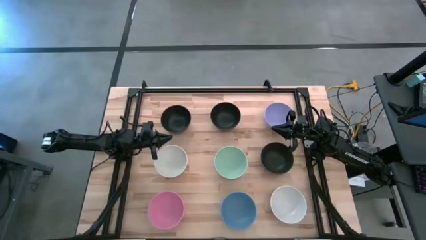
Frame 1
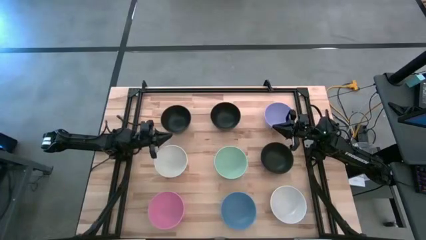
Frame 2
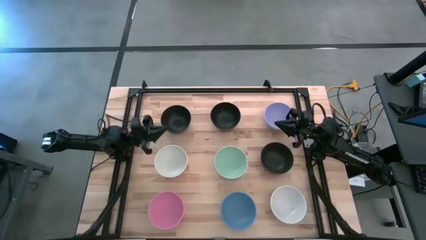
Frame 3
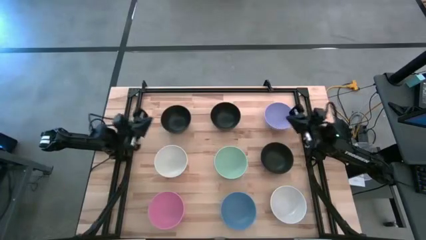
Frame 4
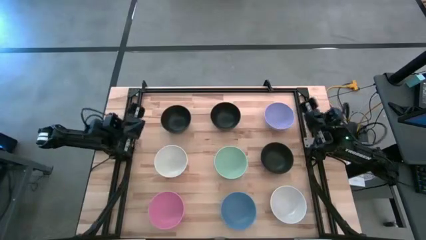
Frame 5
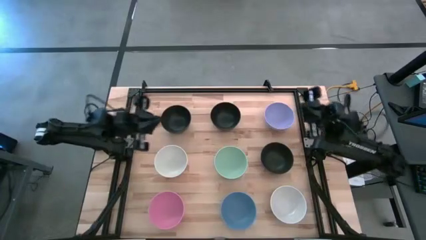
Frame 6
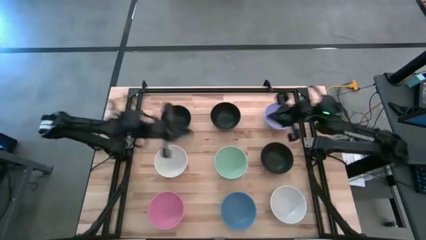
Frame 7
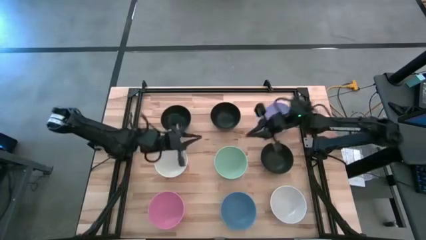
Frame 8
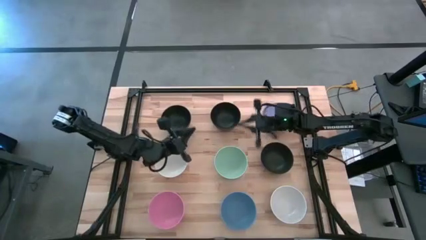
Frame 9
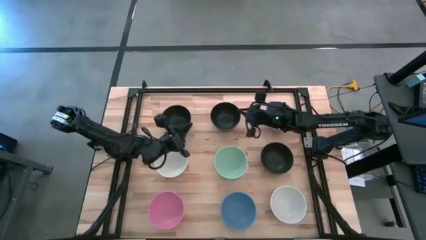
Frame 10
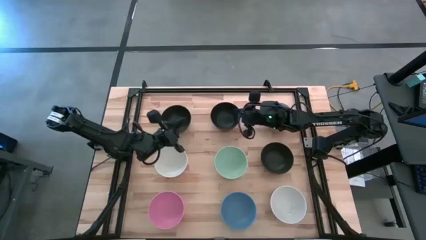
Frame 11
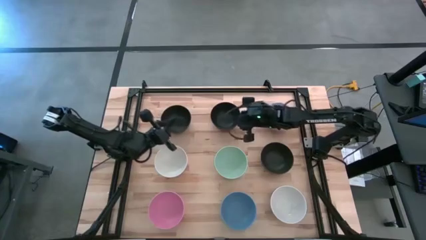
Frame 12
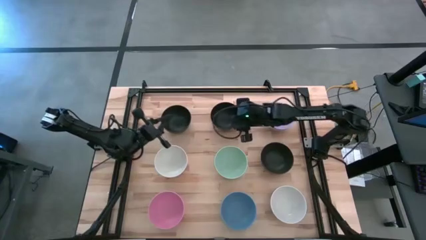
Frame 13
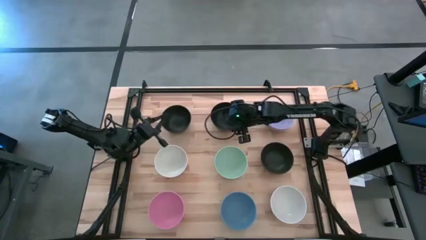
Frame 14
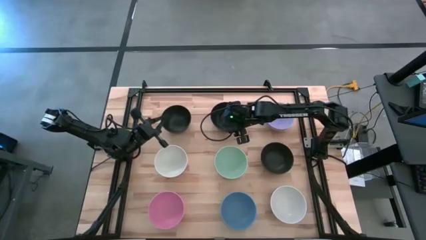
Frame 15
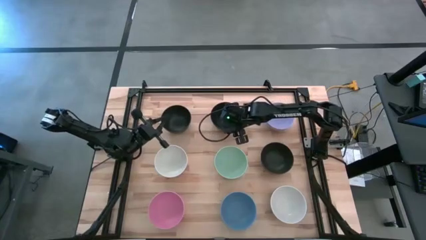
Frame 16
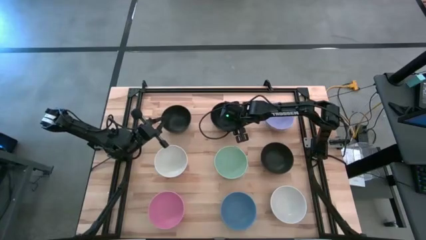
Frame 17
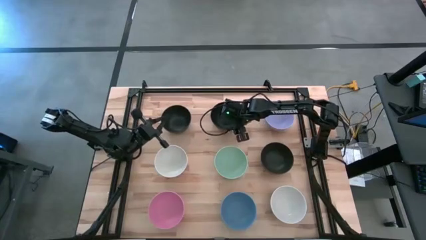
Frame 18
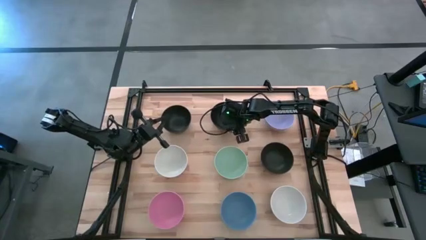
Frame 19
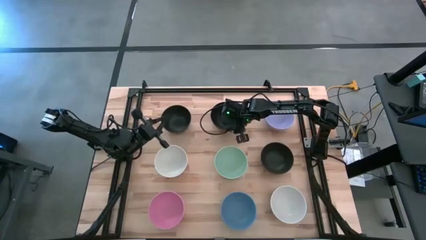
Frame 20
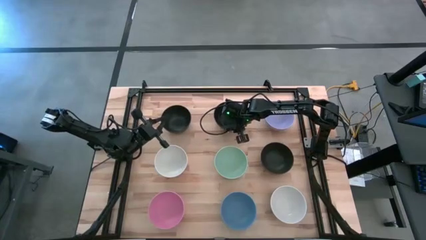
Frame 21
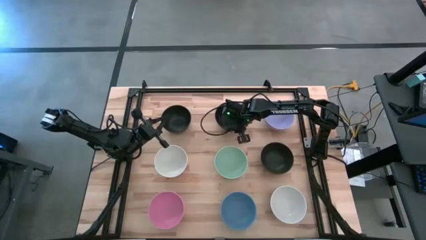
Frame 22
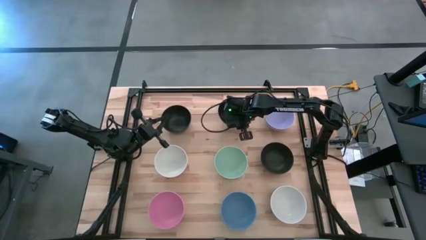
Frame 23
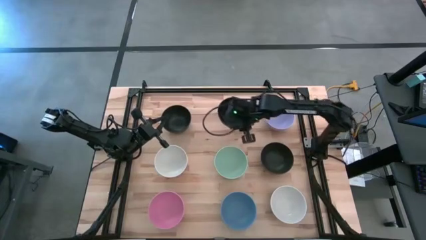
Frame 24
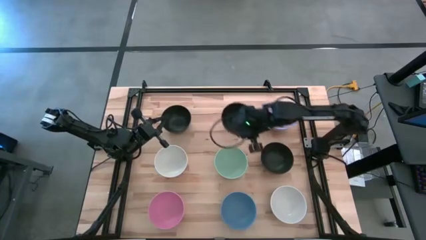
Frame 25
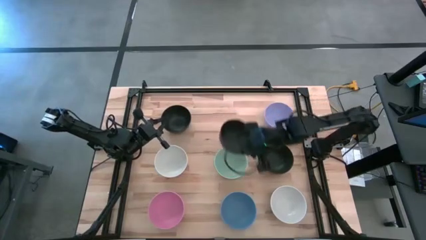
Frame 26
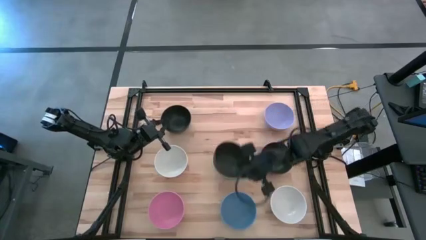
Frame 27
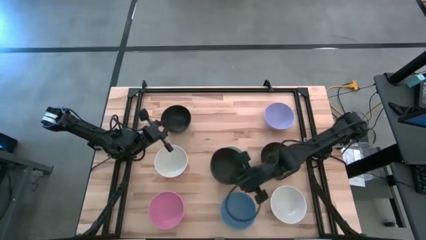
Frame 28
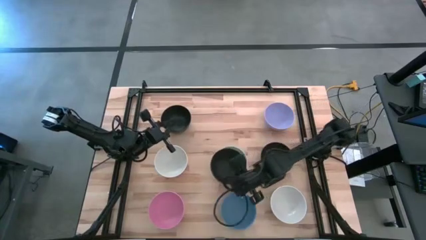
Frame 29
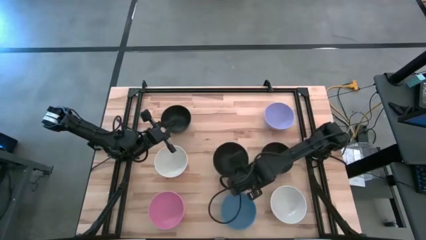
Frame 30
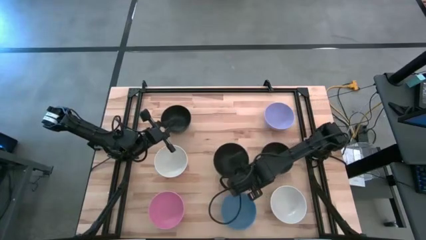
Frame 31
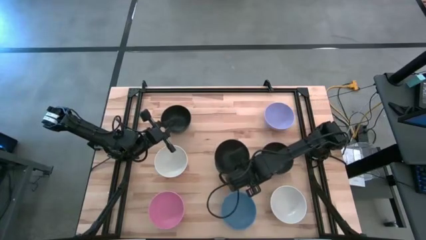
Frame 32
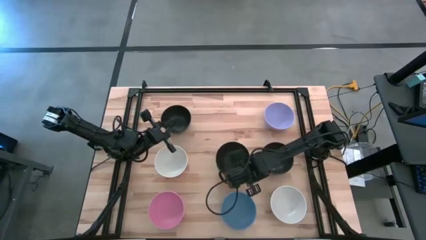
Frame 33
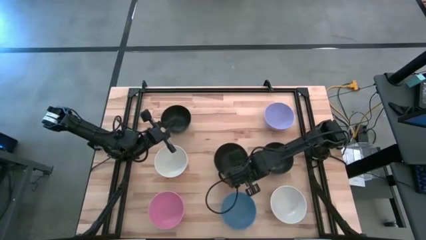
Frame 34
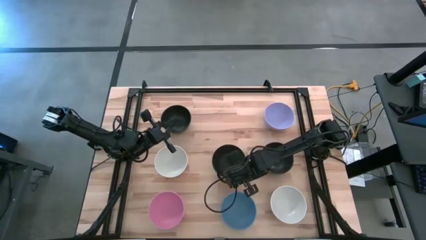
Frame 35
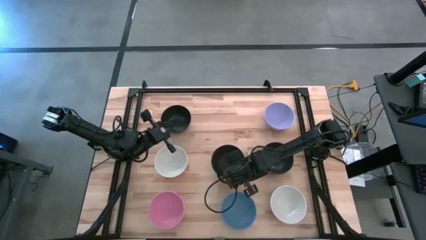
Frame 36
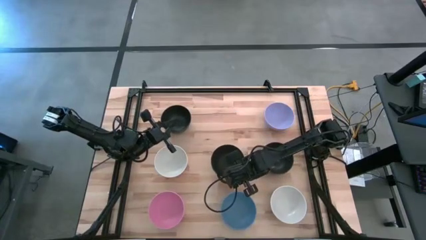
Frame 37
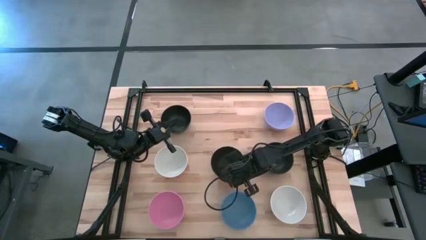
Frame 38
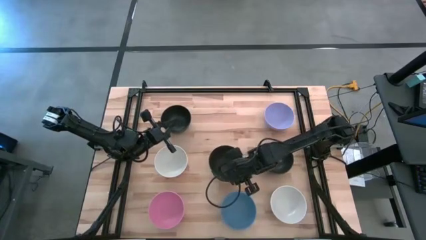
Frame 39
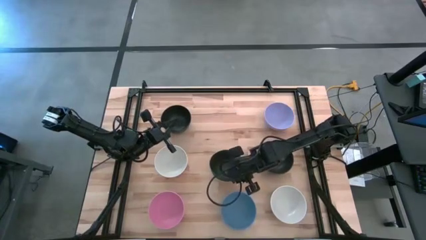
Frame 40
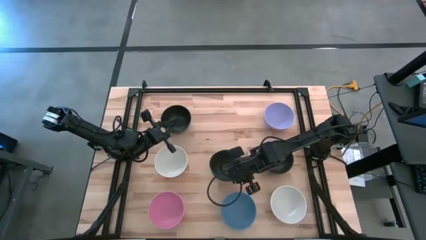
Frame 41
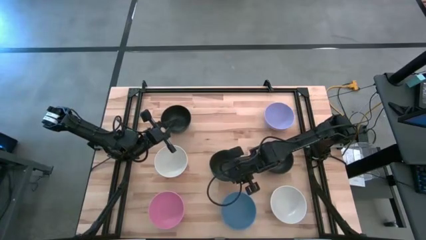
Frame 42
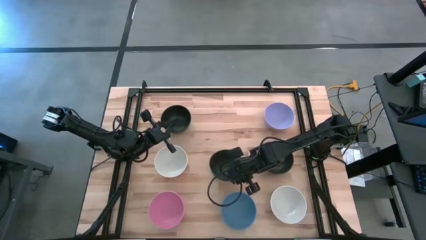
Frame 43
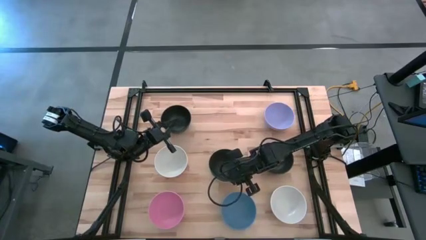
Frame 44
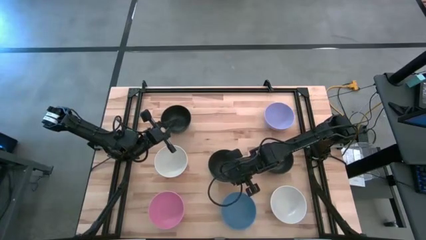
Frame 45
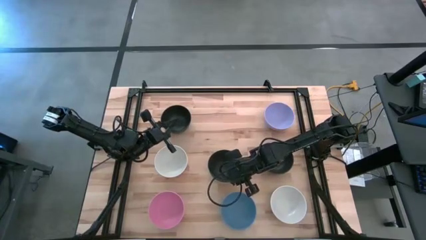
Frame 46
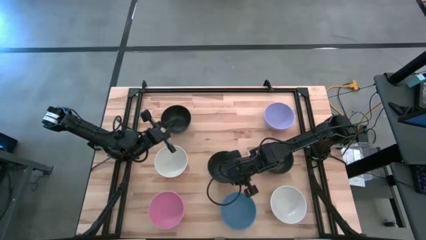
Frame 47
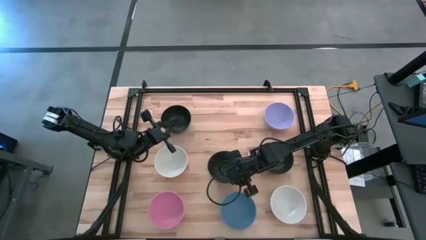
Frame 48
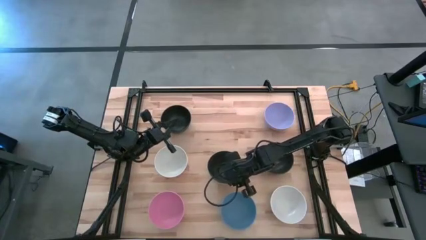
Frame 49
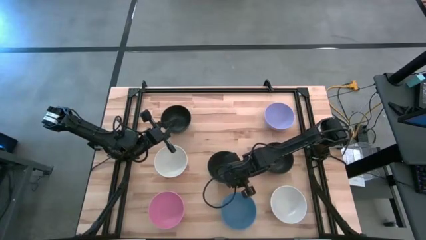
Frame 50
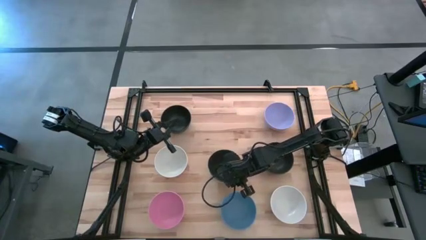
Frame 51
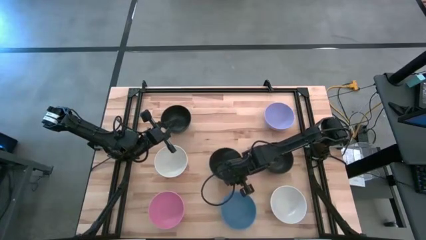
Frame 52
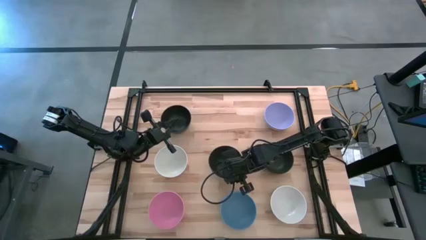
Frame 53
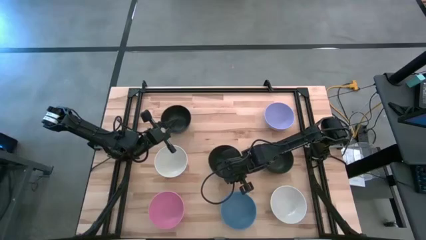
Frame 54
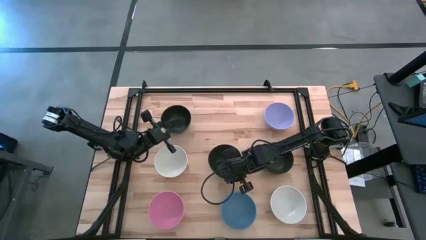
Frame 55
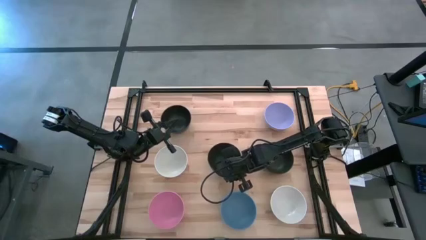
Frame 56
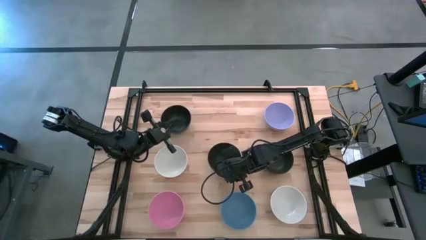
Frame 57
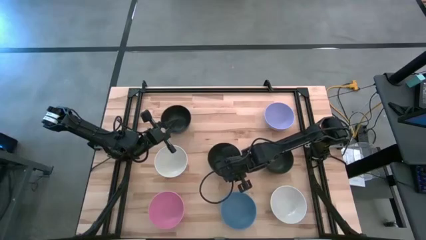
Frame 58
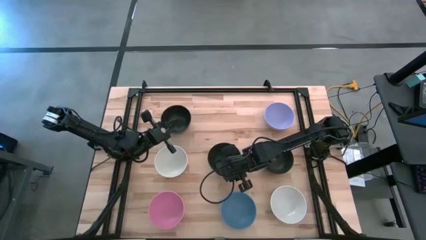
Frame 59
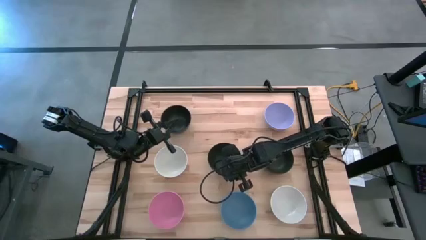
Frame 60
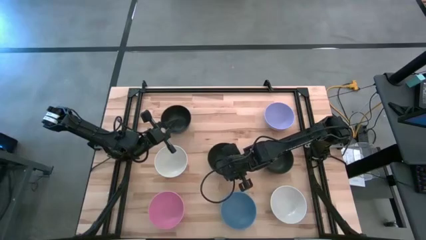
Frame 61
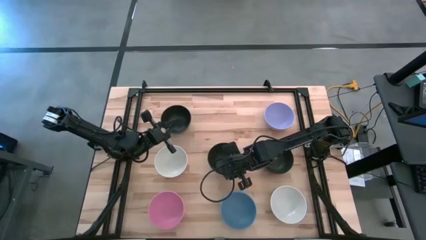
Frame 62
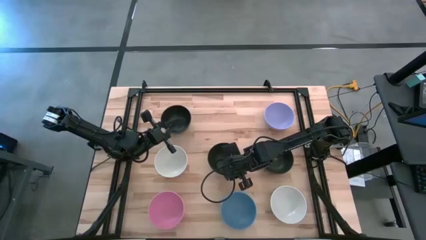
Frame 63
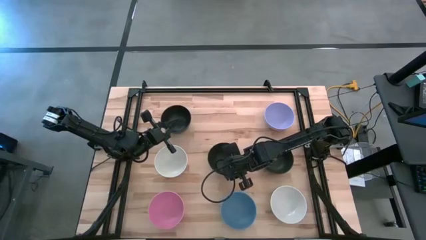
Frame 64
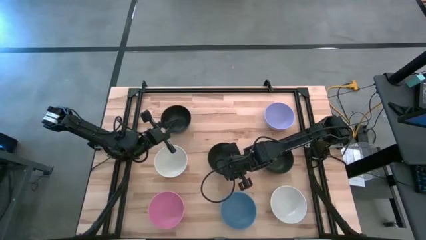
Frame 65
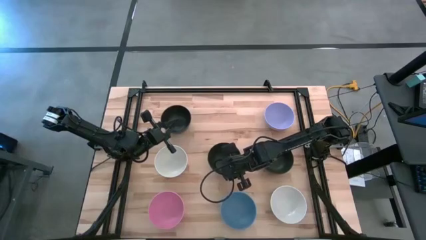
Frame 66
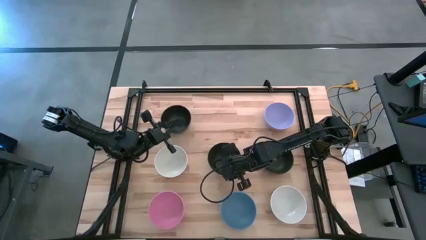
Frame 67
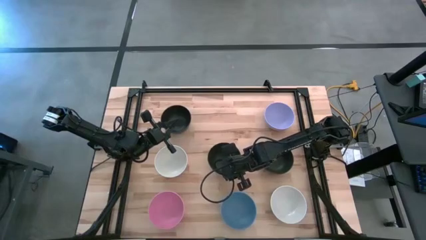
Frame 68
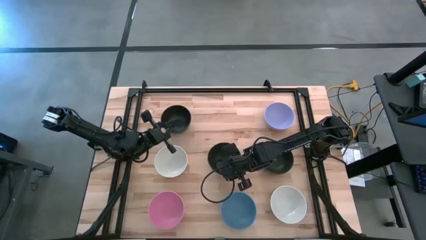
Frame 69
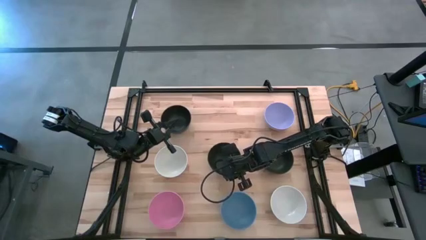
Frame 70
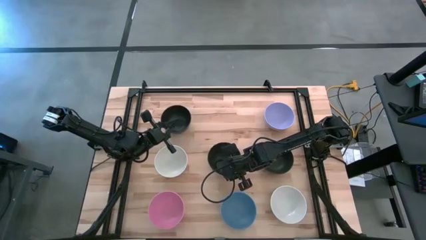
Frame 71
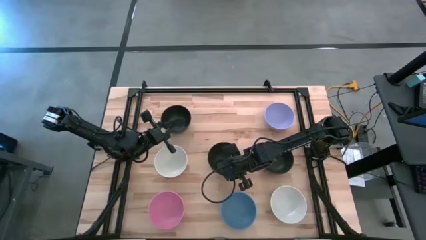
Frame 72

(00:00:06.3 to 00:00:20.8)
Task: Nest bowls inside each other
Stack the middle black bowl on the green bowl
